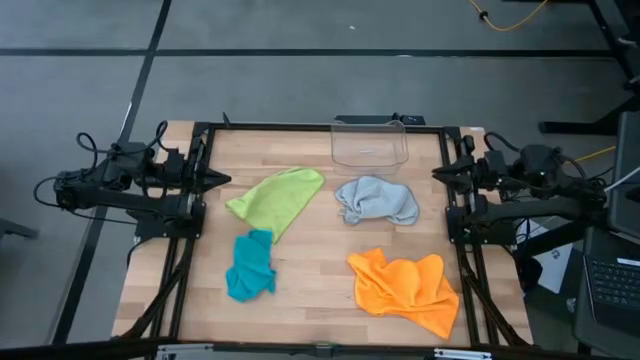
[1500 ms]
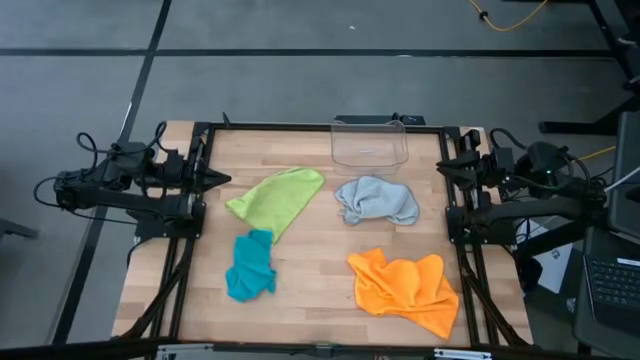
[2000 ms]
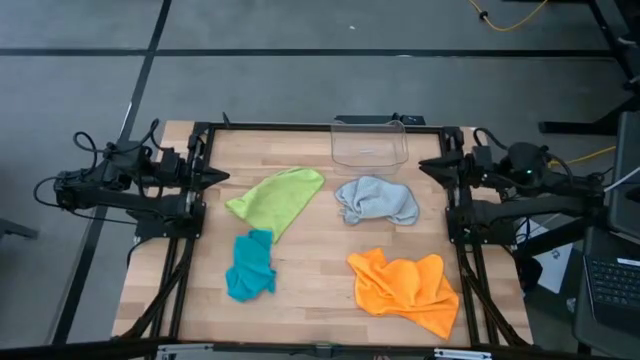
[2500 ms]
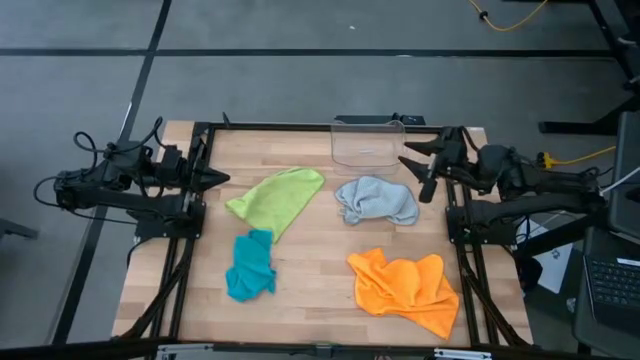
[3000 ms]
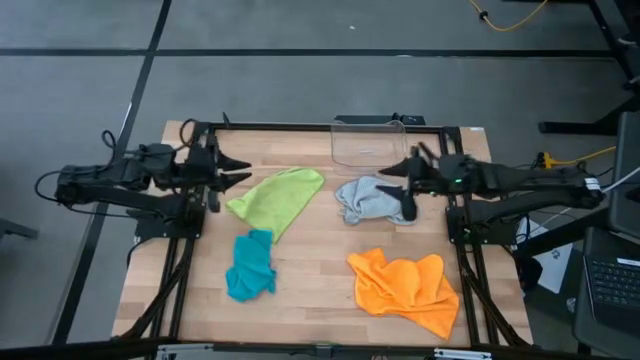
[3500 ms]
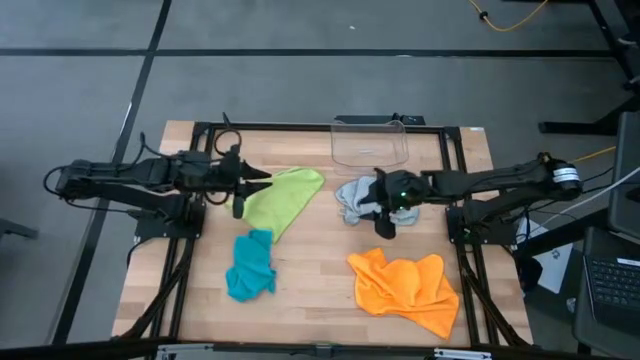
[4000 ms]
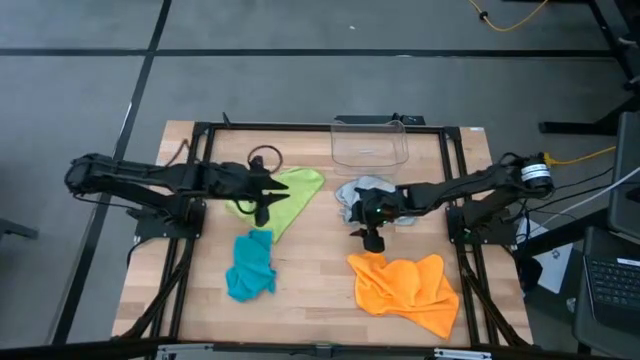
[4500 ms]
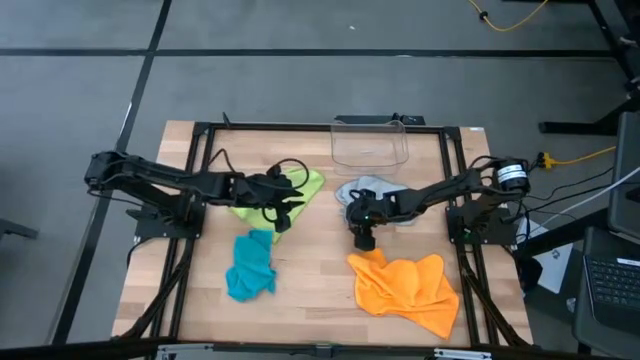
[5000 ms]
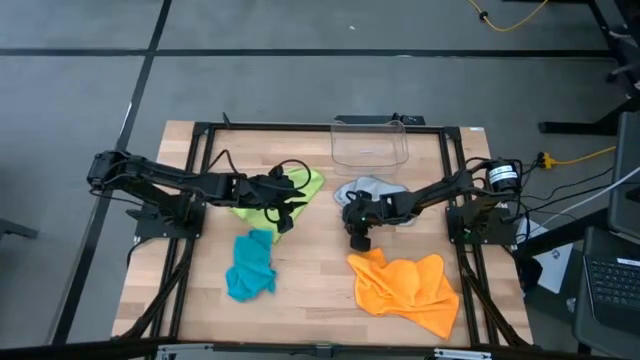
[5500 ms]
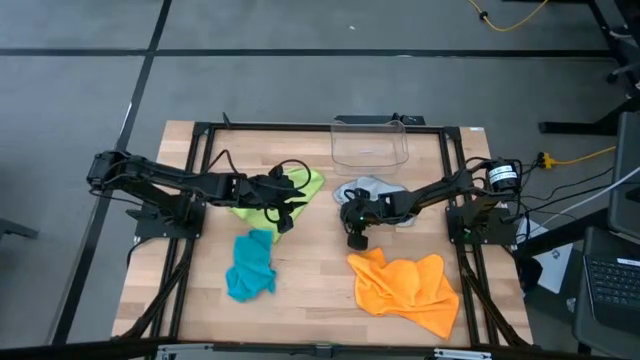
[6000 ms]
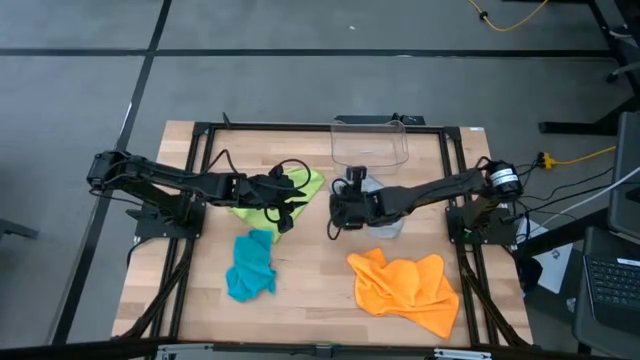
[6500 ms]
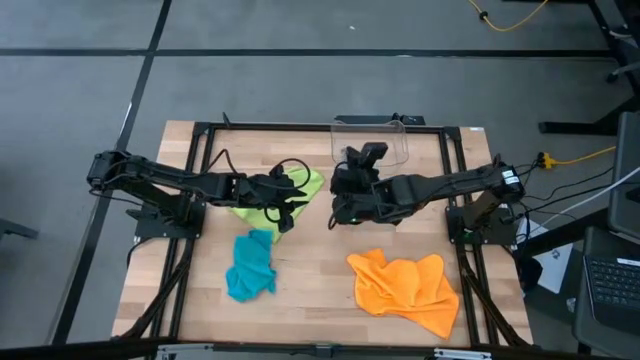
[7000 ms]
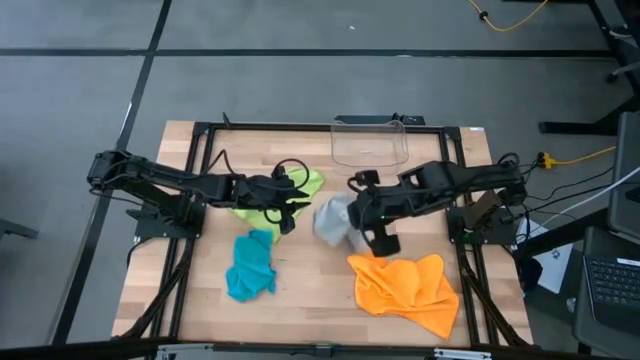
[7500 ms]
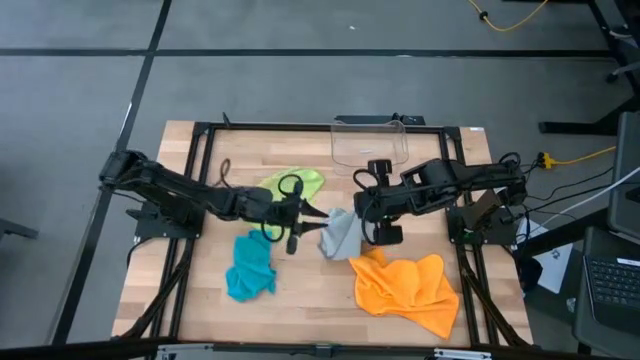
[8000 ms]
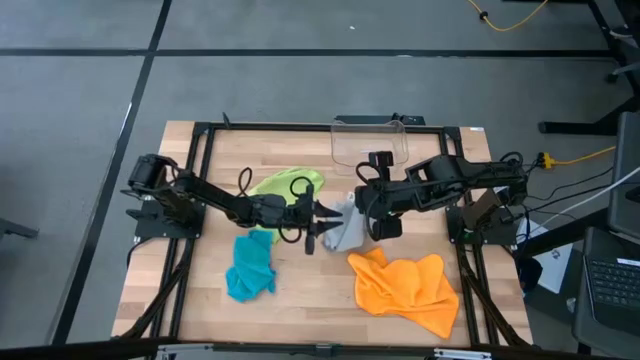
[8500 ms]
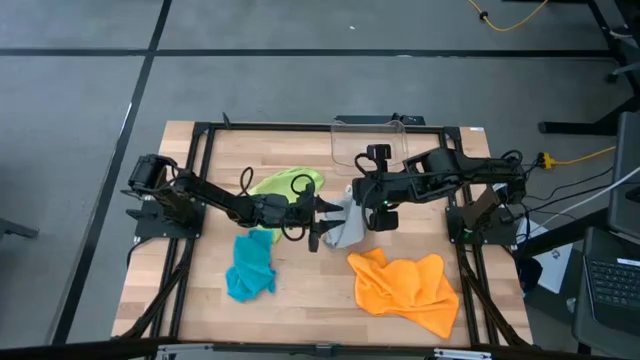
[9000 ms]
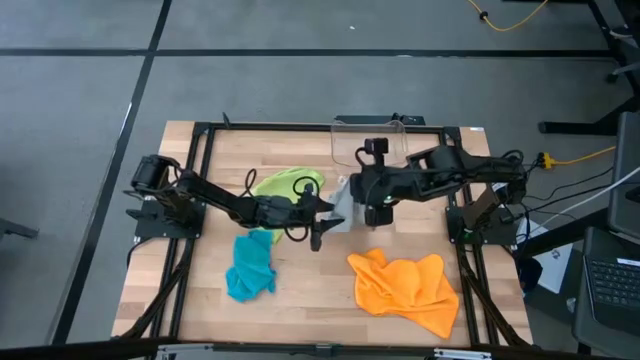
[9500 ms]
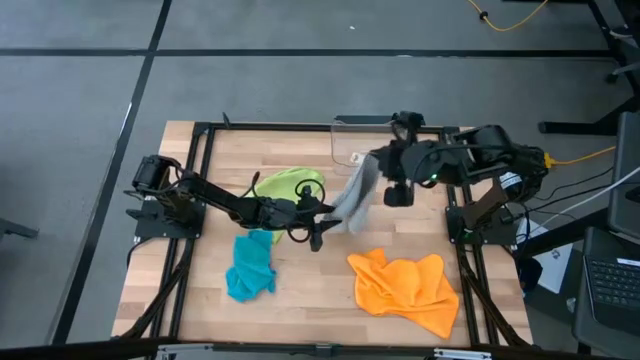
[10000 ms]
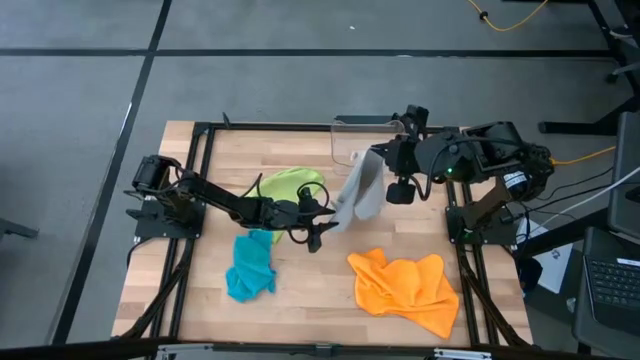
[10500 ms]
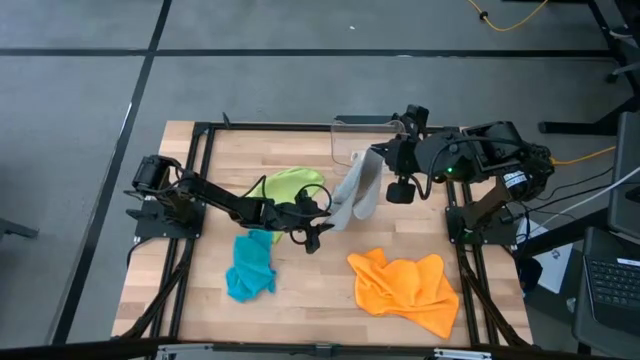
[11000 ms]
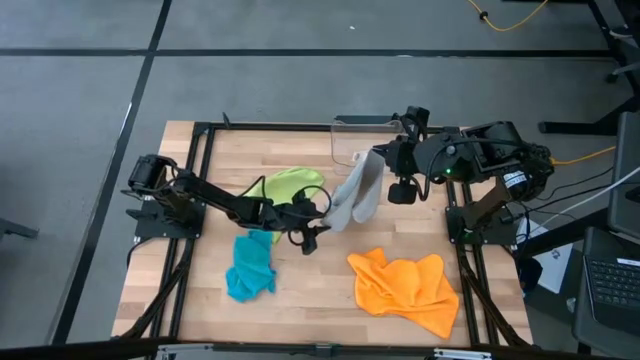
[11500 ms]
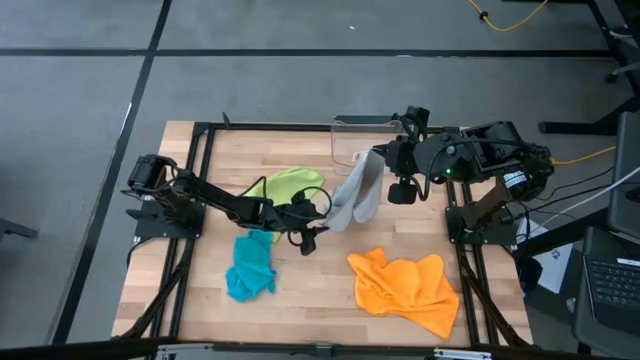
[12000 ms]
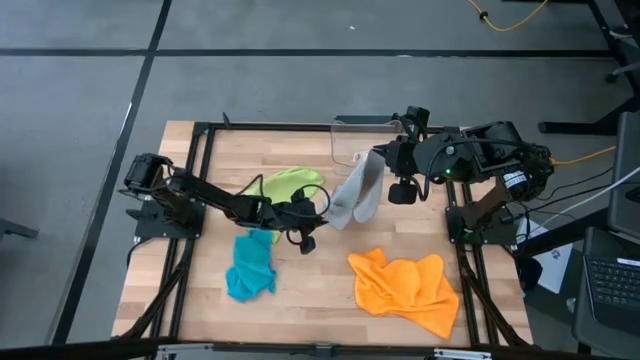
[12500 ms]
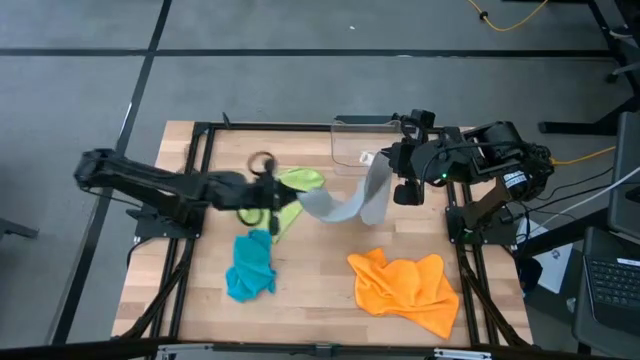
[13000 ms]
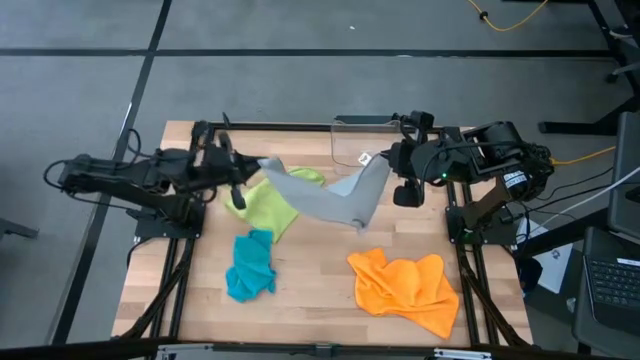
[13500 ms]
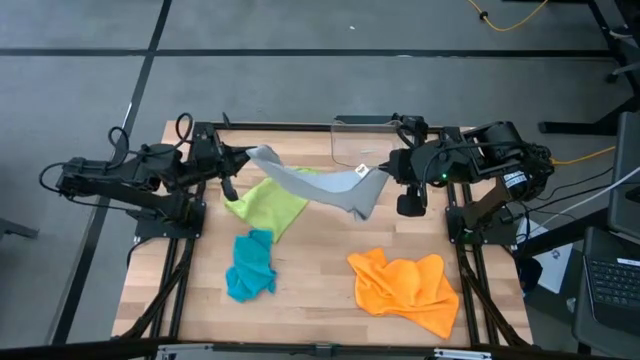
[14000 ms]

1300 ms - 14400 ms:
Task: Fold microfiber towels
Fold the gray microfiber into half
